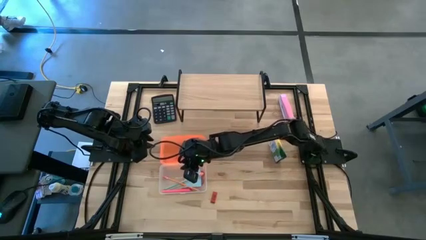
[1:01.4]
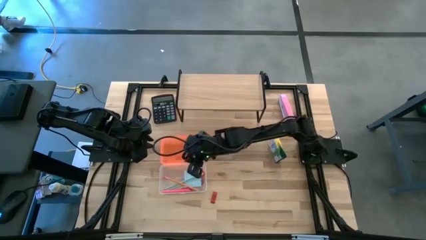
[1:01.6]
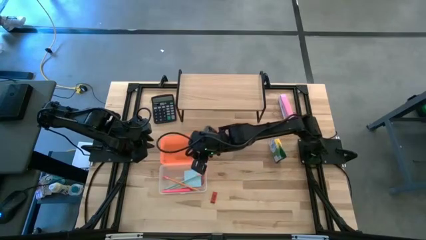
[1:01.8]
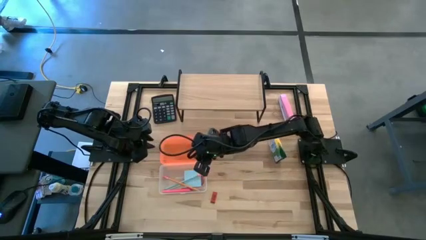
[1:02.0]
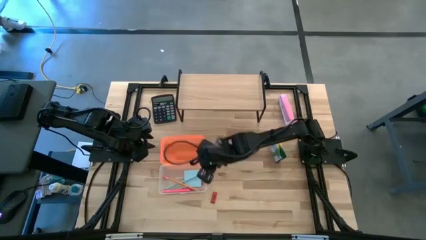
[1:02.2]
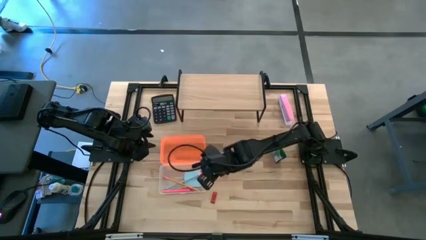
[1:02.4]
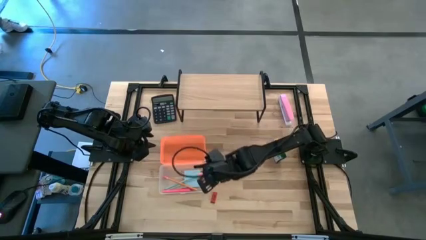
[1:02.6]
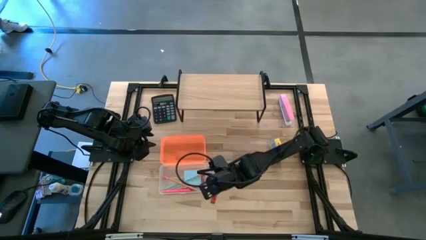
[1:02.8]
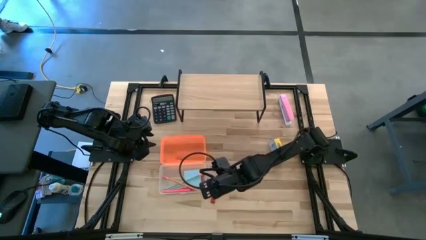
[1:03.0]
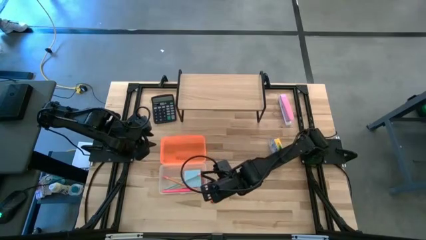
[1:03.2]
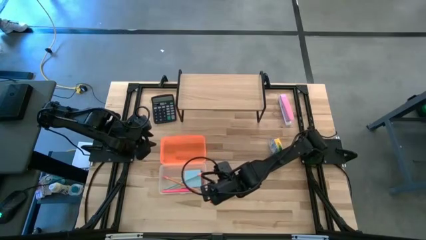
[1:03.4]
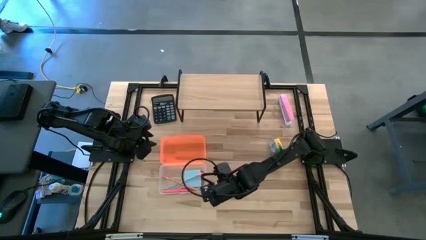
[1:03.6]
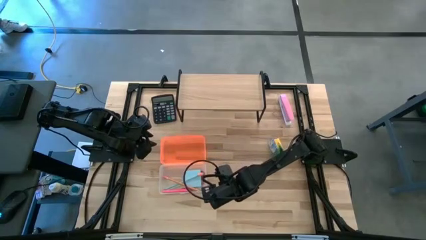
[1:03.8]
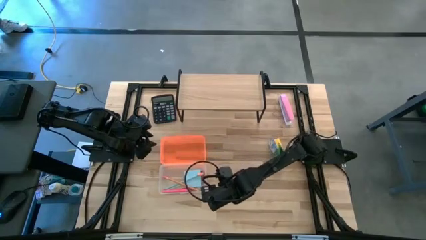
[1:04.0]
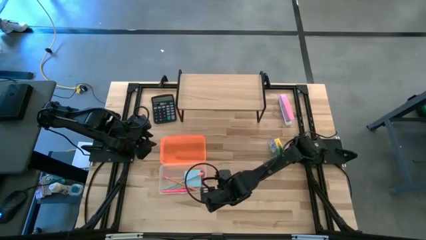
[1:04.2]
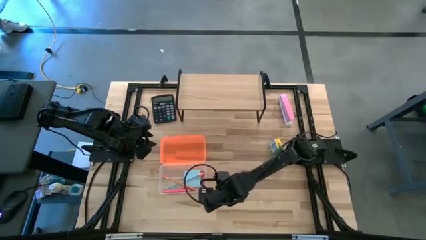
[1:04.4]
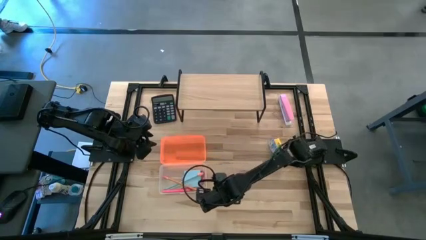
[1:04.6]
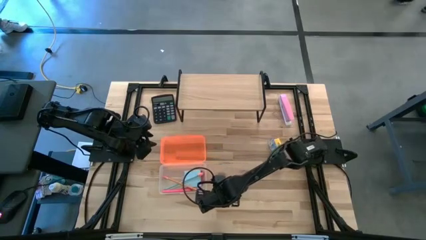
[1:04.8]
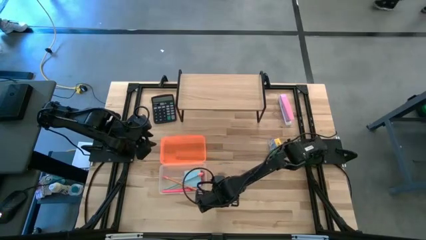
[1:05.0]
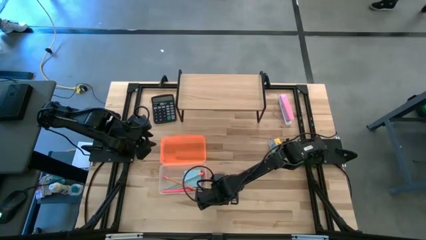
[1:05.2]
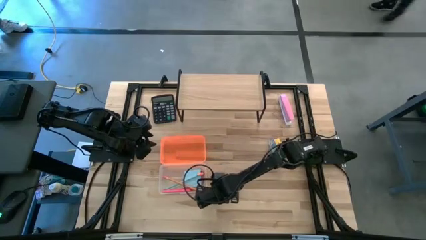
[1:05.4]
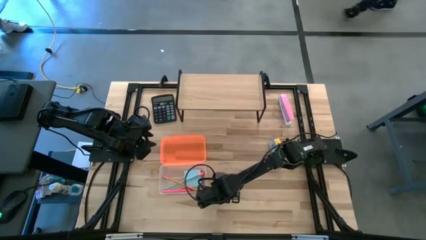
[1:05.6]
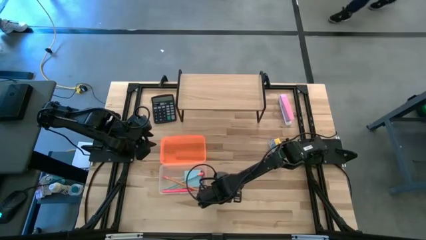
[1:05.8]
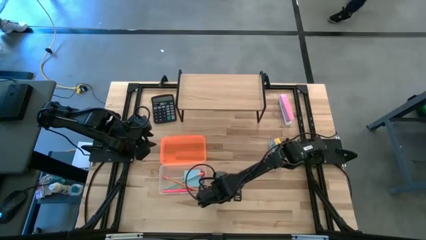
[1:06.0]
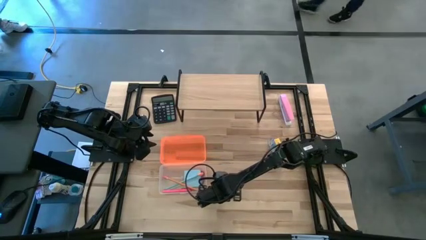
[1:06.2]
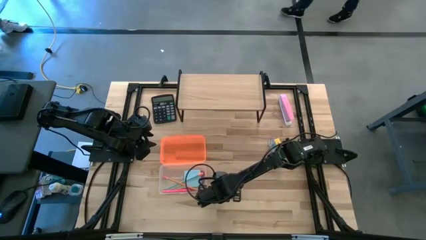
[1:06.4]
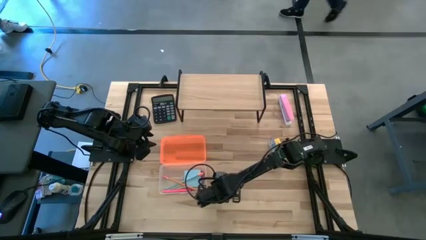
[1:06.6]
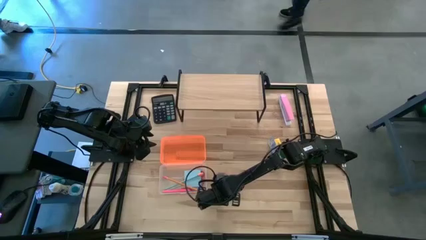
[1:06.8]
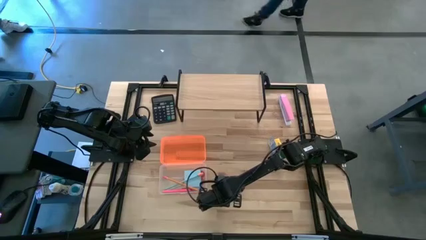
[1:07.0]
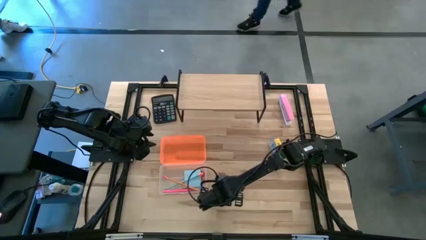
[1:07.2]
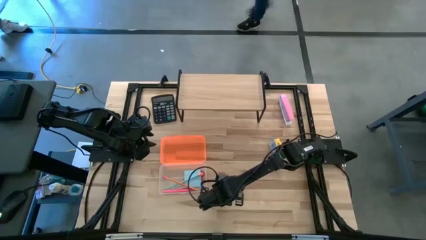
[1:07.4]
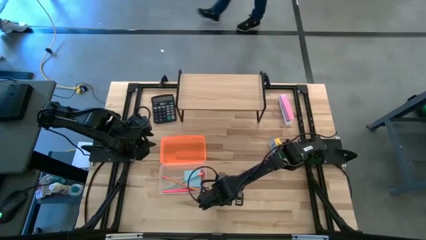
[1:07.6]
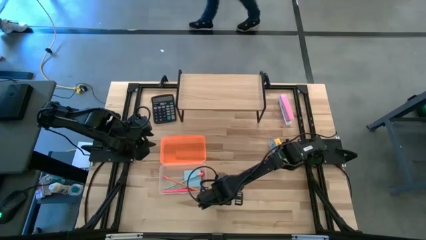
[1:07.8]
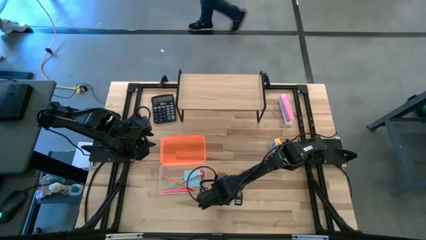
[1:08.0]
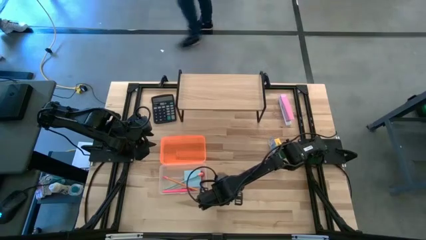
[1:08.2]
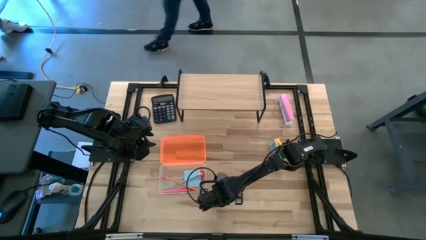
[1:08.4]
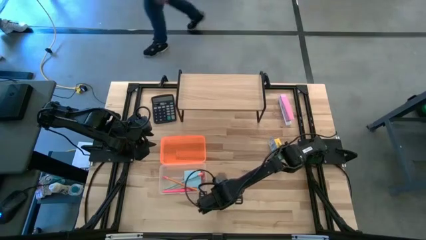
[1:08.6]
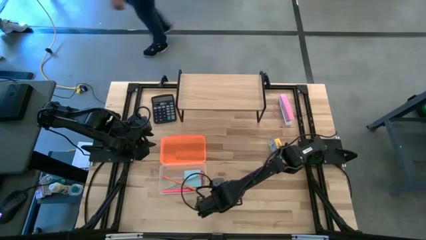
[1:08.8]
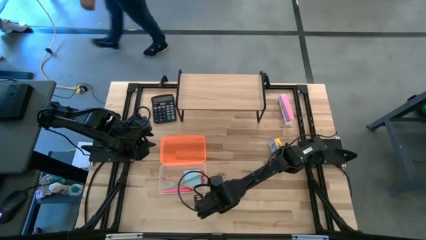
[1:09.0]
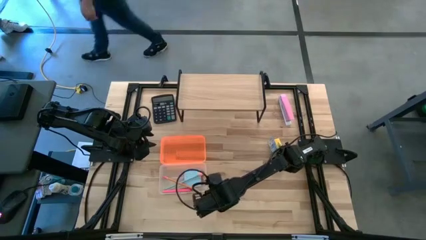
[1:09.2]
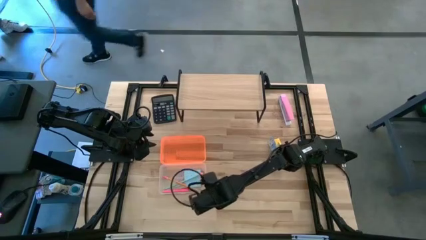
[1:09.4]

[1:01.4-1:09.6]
Task: Pack school essentials
Put the red eraser into the supply box

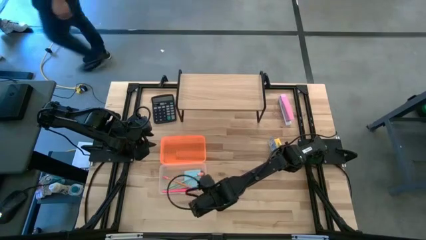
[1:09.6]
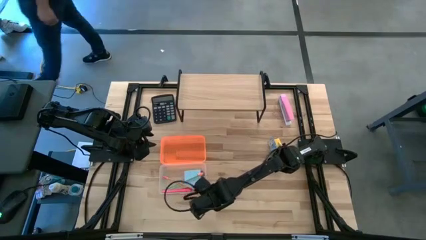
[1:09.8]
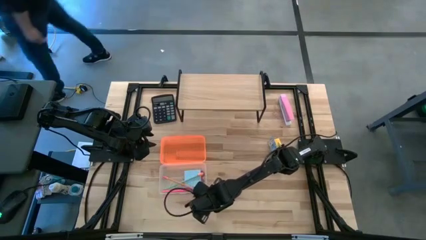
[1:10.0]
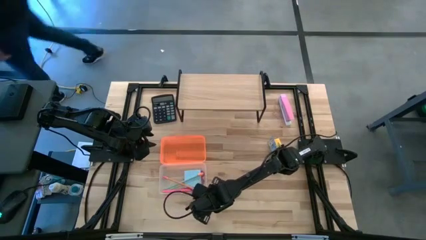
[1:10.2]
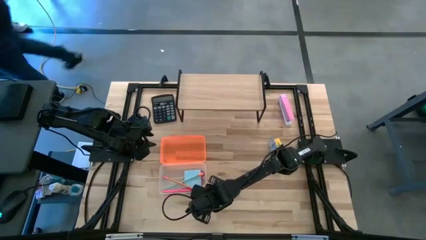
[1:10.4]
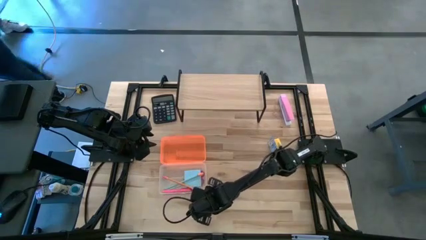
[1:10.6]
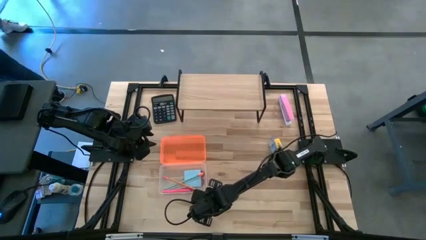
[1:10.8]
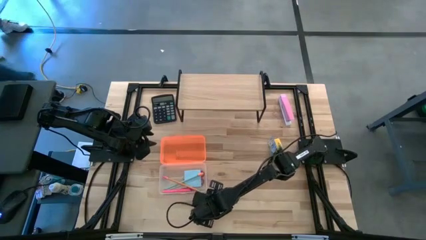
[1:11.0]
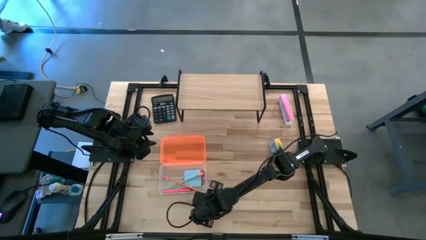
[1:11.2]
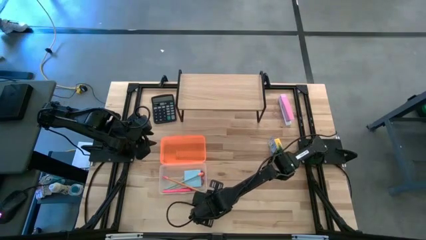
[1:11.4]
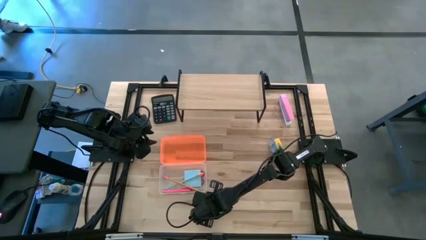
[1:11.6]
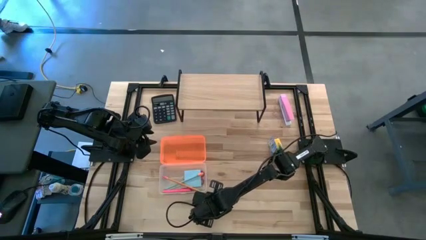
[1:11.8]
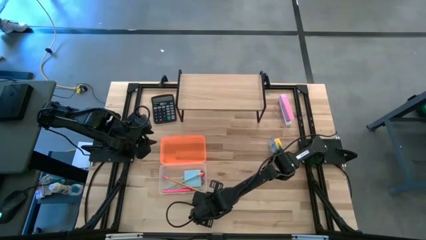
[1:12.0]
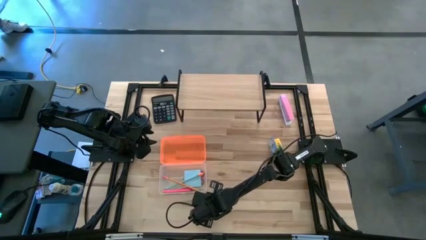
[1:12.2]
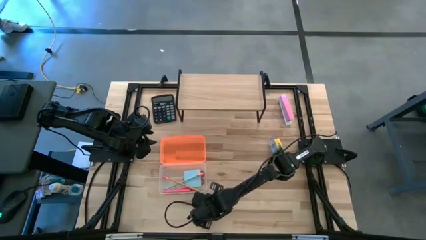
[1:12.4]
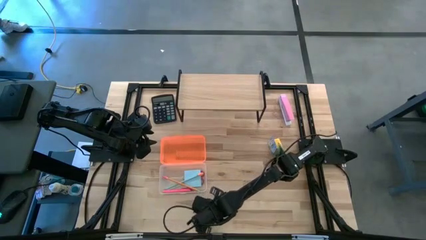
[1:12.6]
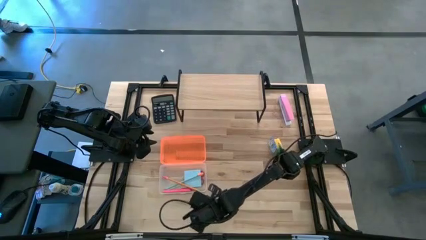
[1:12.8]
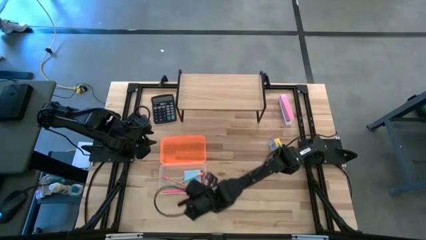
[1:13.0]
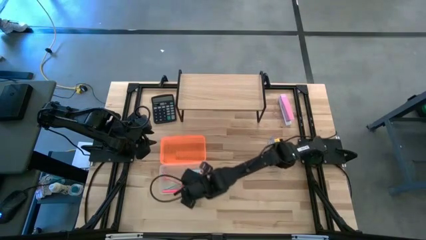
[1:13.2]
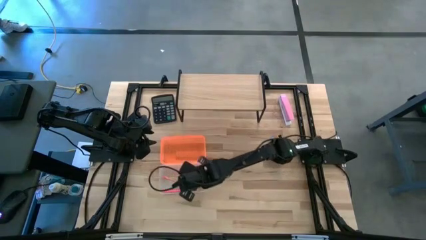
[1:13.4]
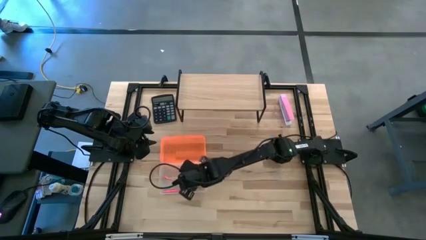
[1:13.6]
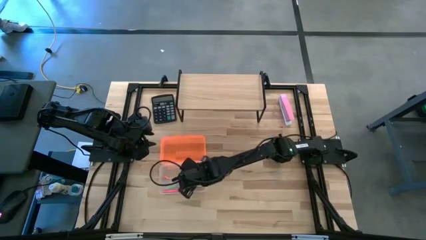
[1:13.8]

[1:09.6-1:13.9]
Put the red eraser into the supply box

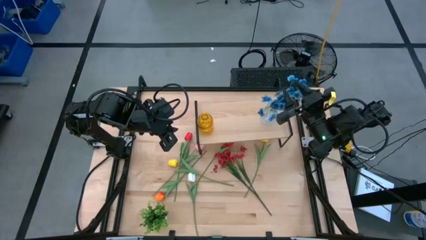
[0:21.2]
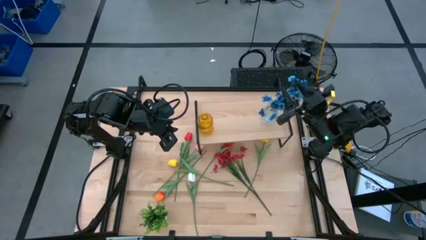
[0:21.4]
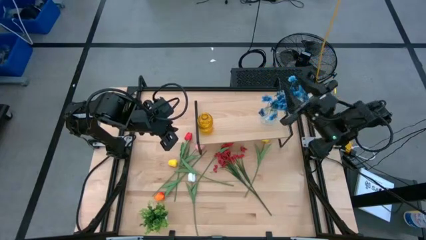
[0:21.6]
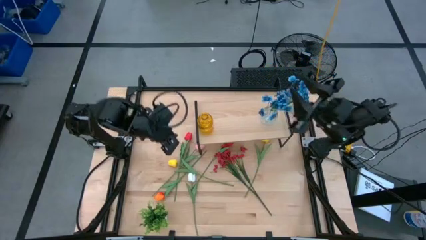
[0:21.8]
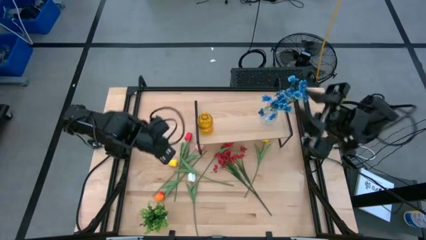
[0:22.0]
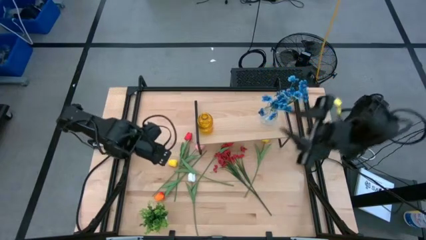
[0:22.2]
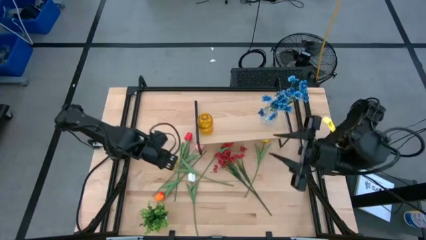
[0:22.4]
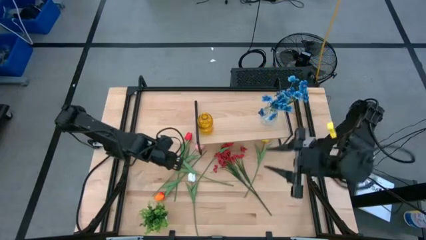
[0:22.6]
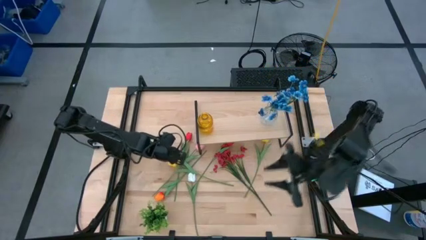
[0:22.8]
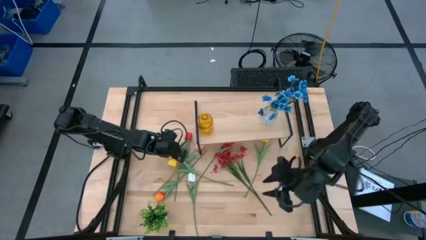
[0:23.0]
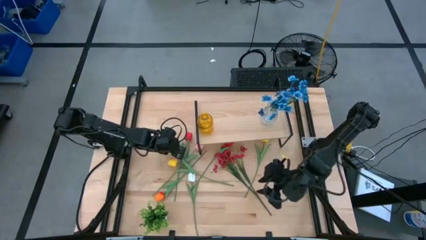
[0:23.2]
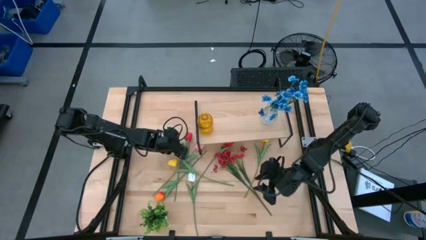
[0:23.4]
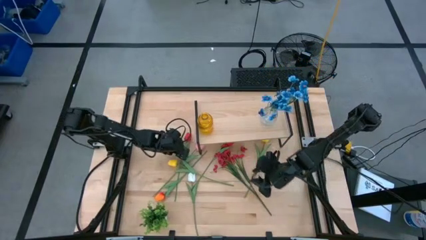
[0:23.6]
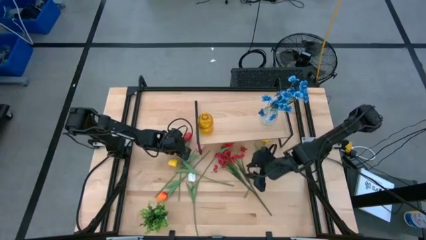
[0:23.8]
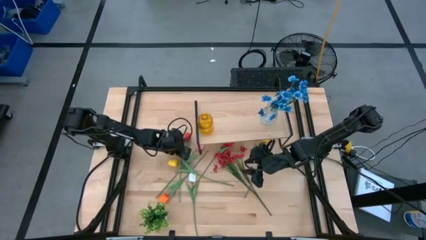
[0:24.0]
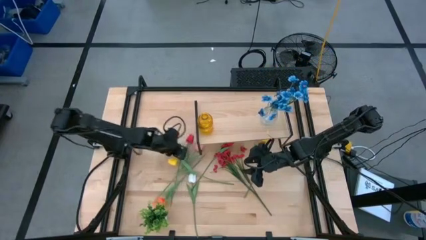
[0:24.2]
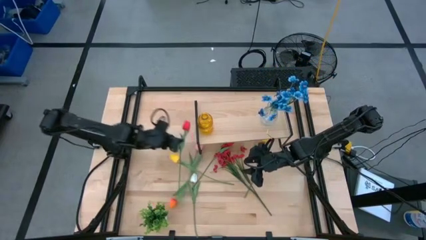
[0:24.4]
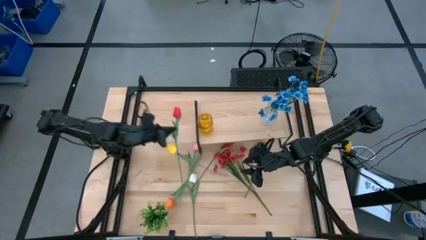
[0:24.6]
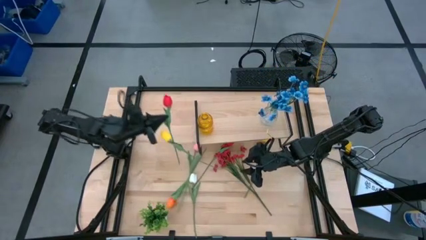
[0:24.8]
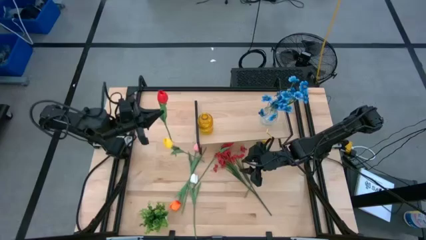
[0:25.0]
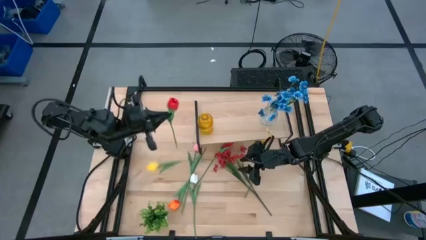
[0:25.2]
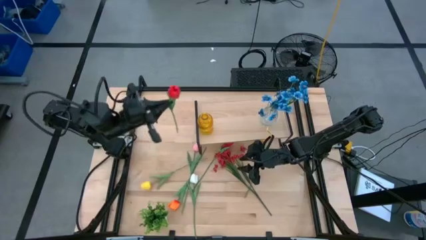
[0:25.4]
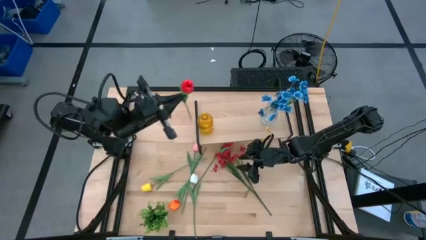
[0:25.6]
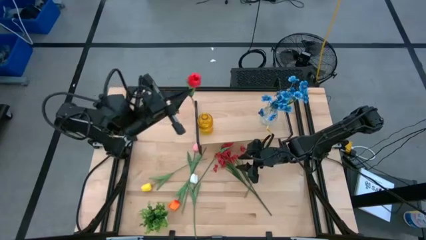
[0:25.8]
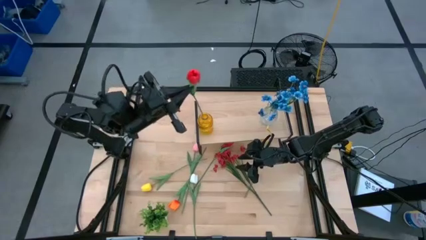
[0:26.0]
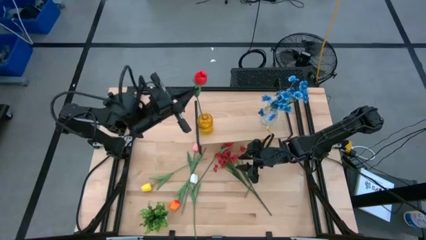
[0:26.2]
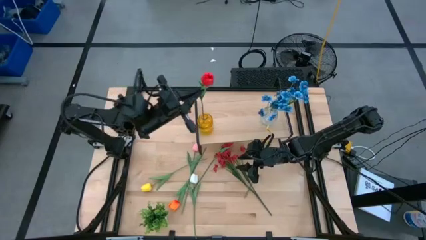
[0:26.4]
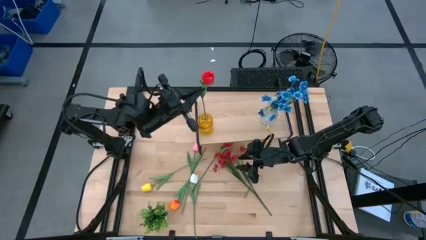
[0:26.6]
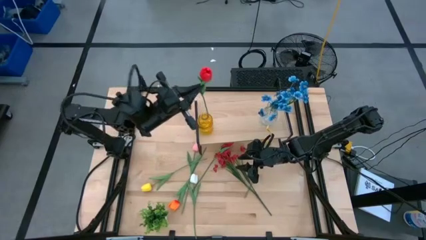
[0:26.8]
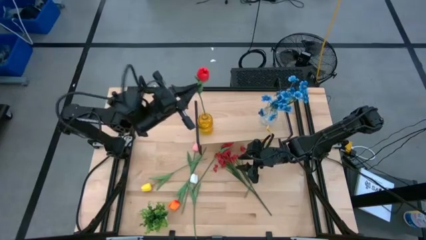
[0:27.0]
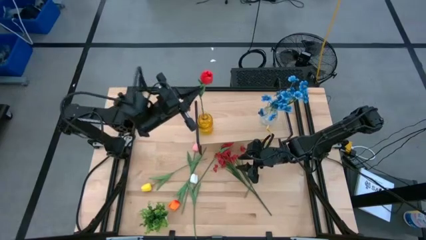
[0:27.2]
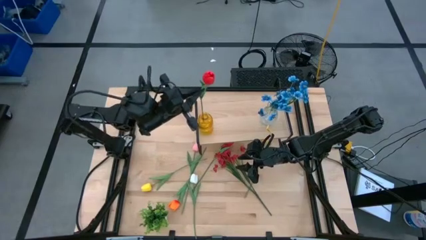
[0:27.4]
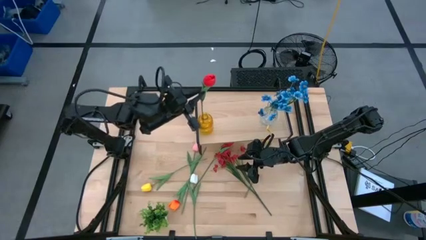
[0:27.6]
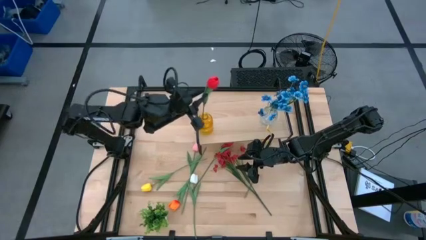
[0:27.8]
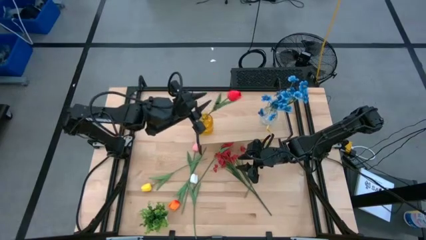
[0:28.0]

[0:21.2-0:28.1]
Task: Pick and place flowers into a vace then onto a shelf
Put the left red flower into the yellow vase
